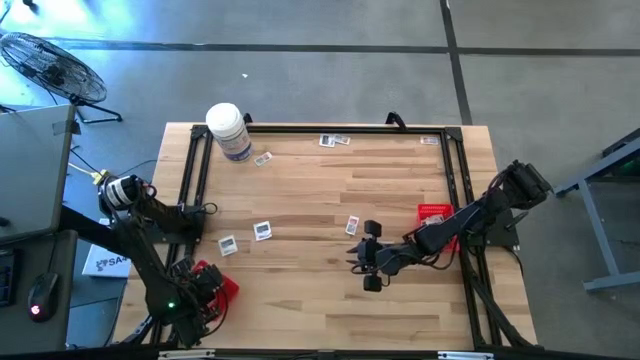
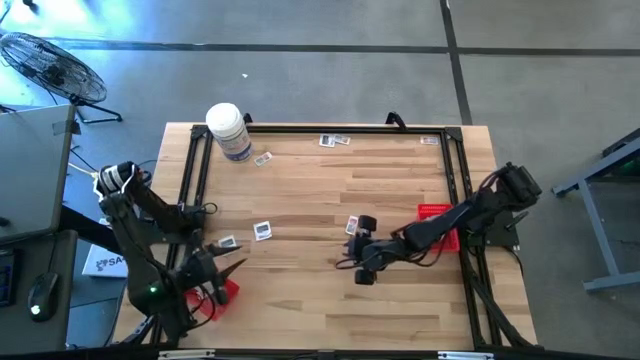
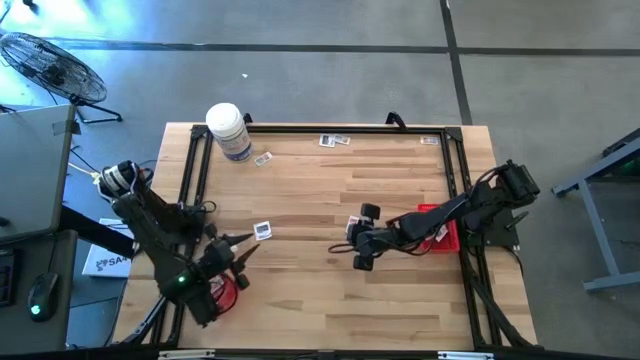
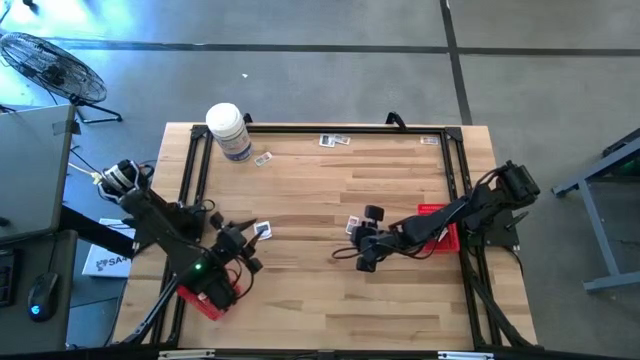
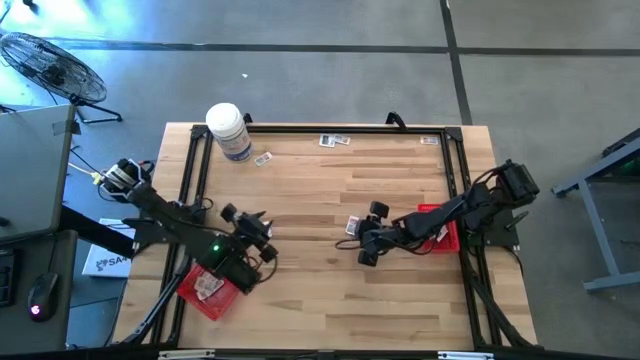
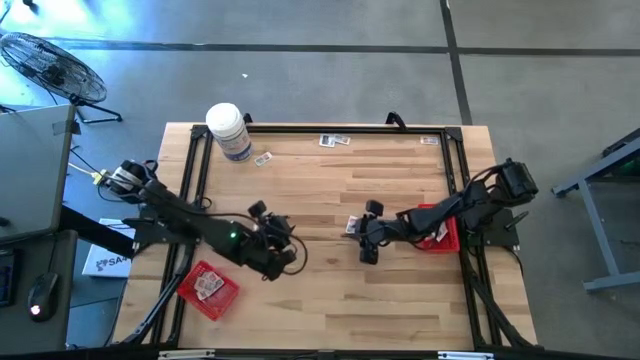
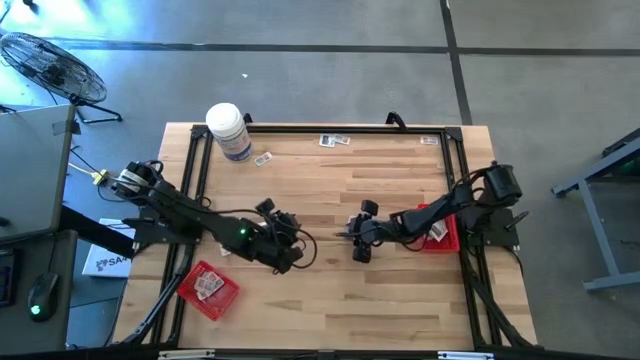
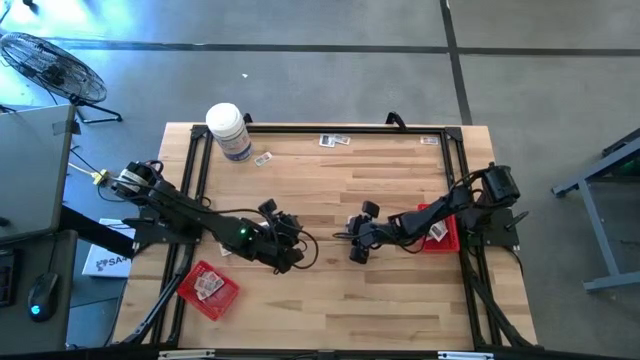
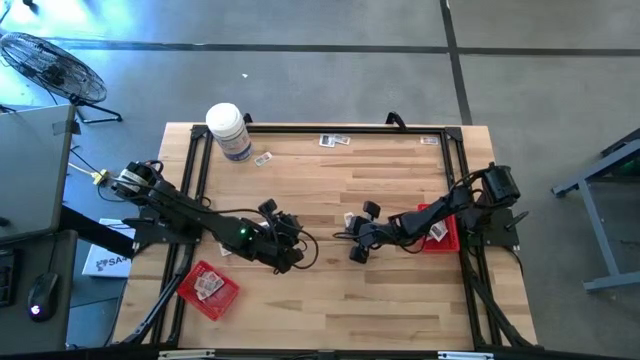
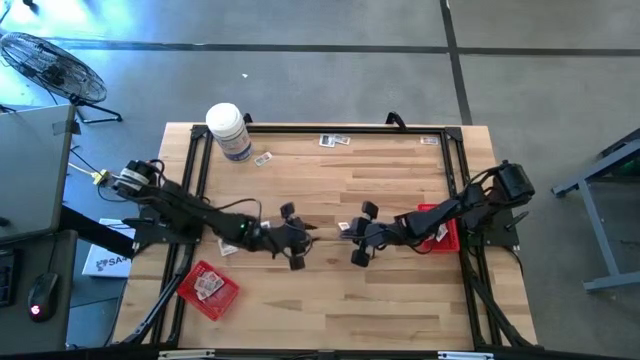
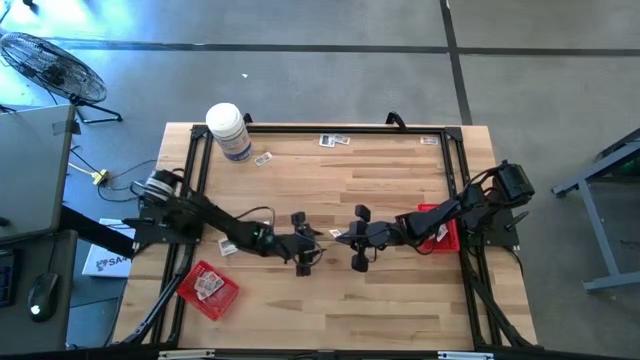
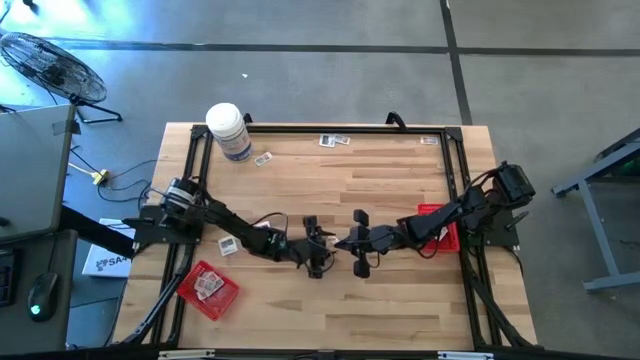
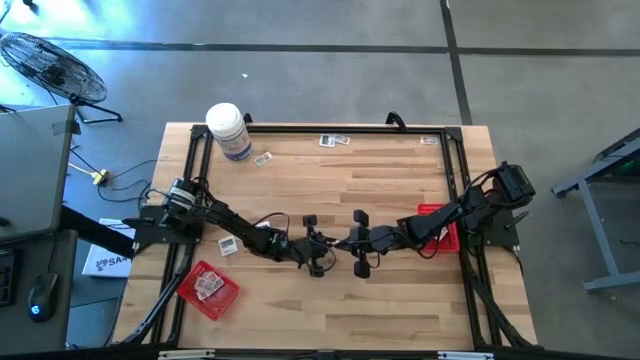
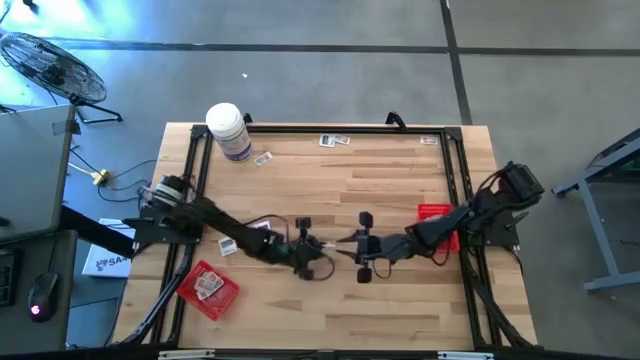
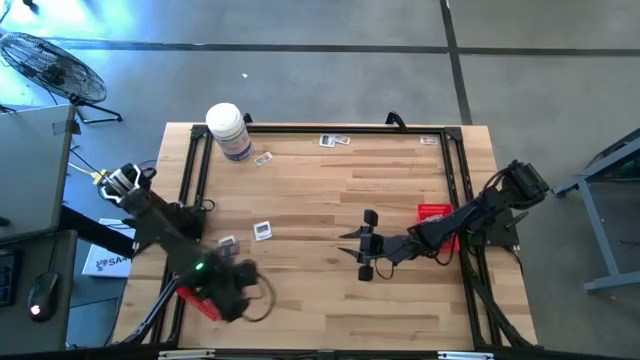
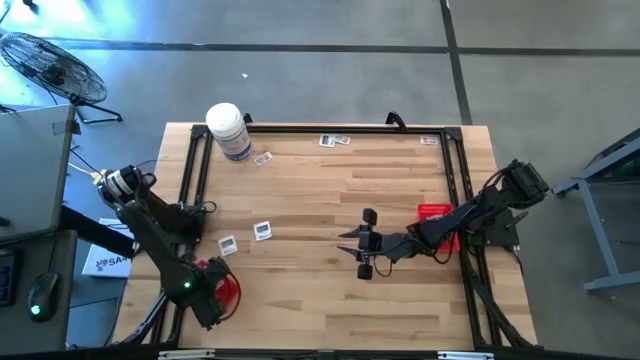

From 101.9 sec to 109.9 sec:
Task: Pick & Place First Aid Supplies
Put the ointment pack into the left red bin

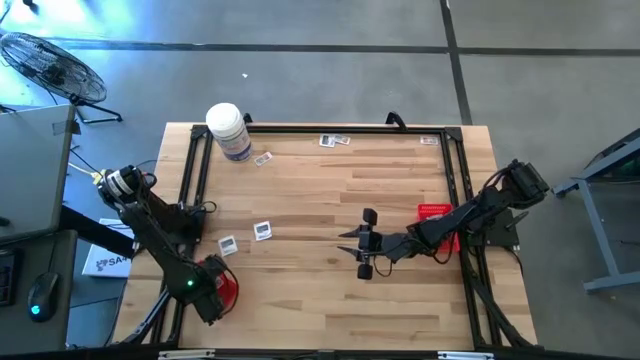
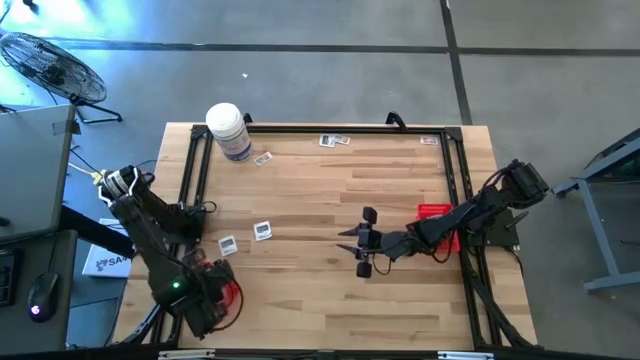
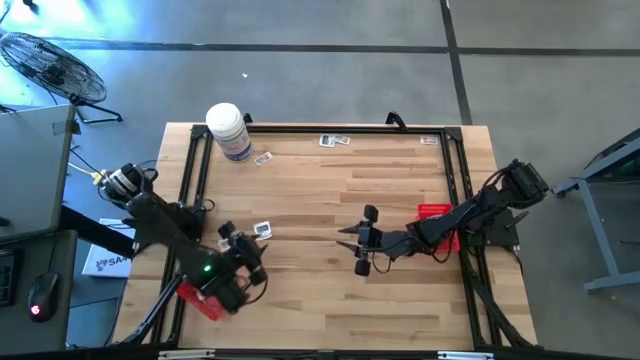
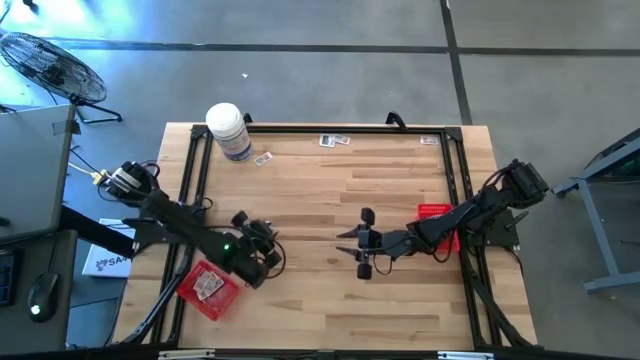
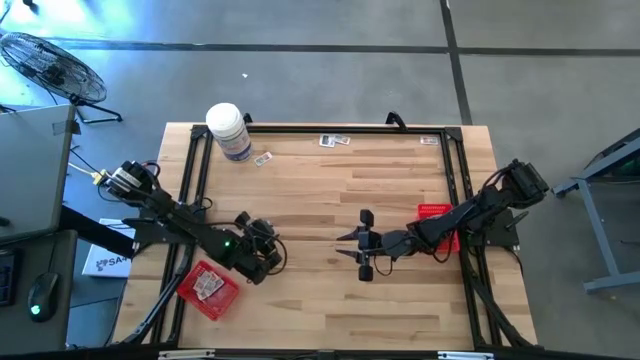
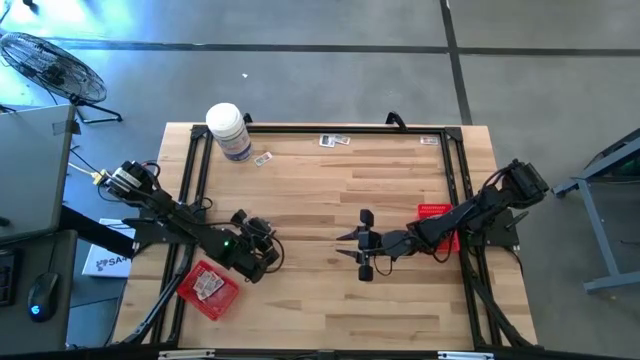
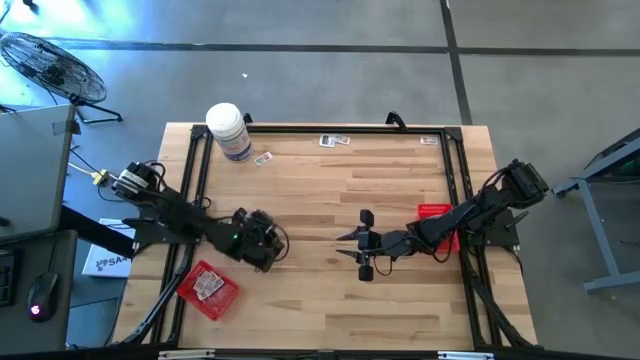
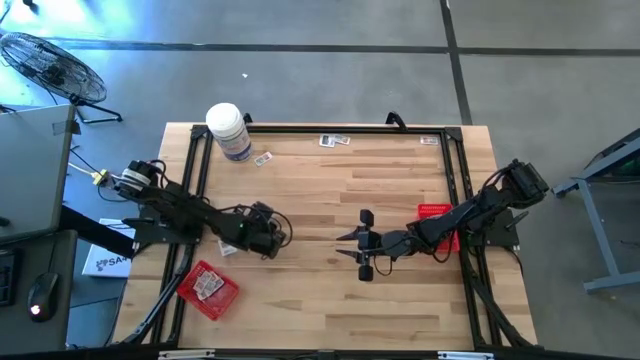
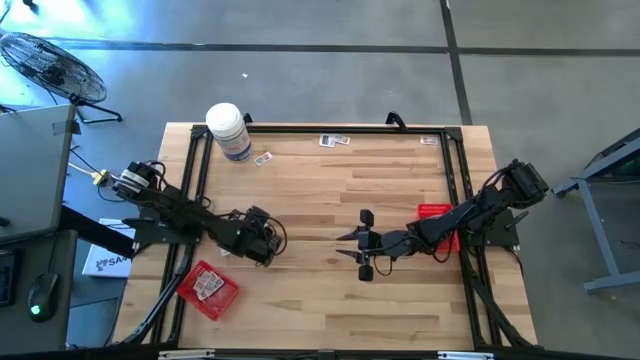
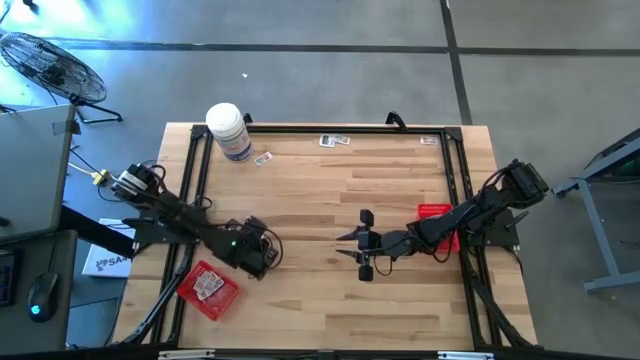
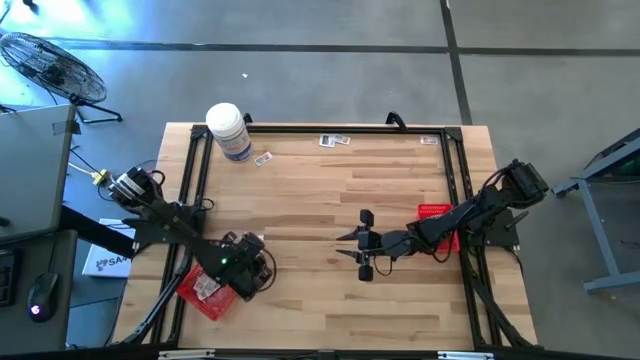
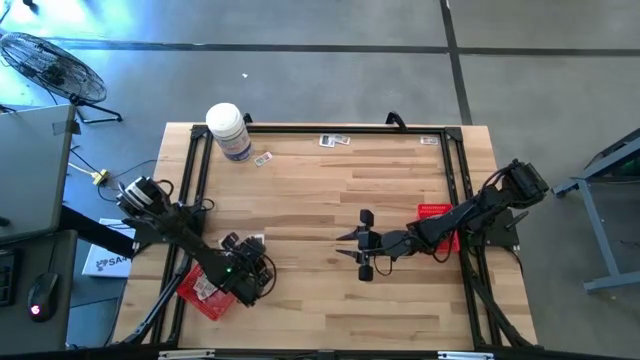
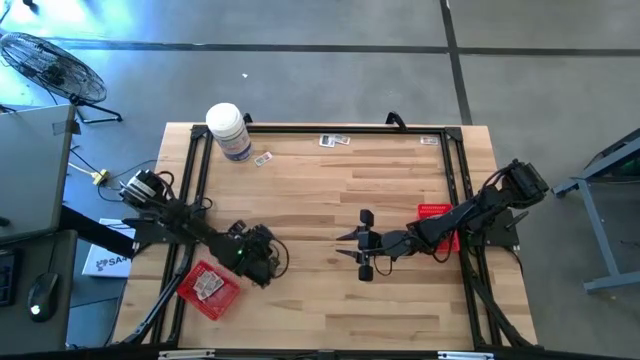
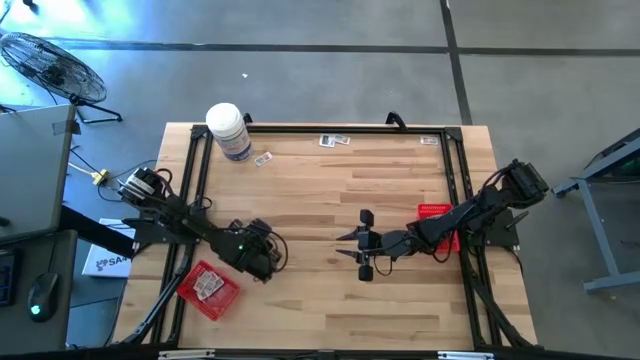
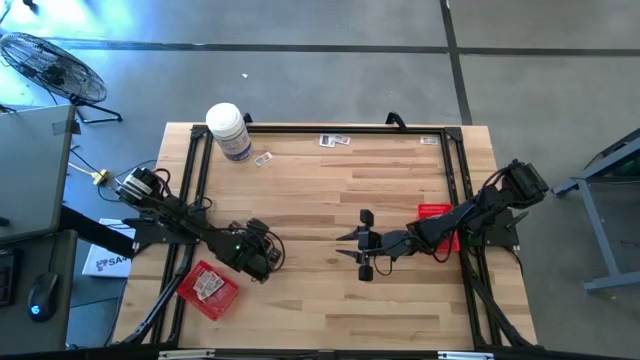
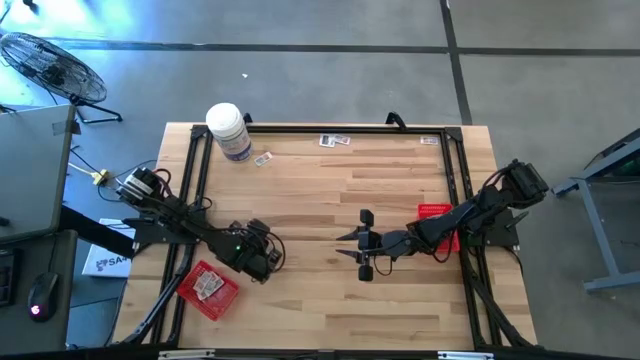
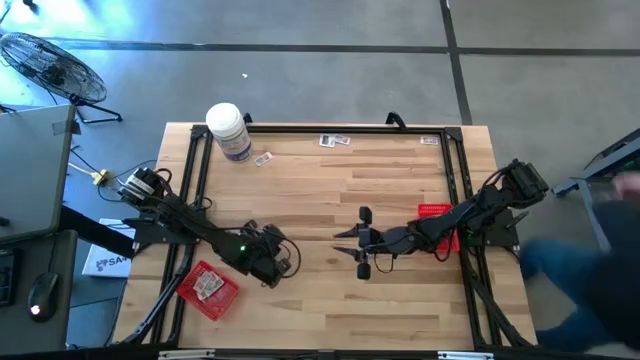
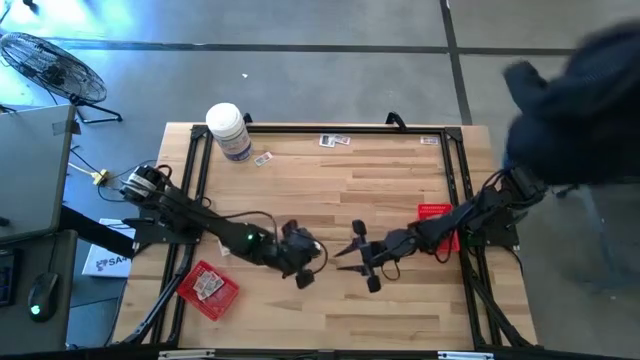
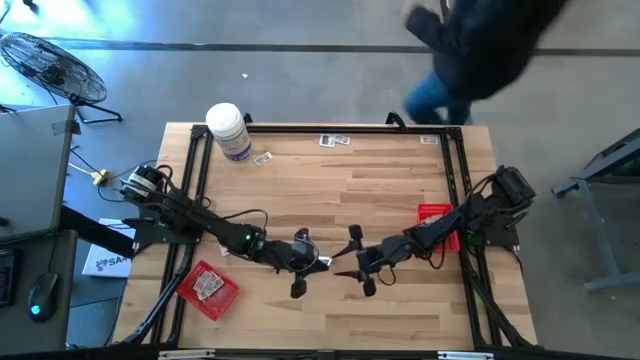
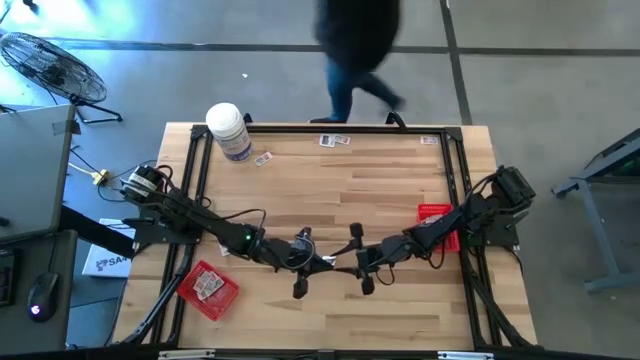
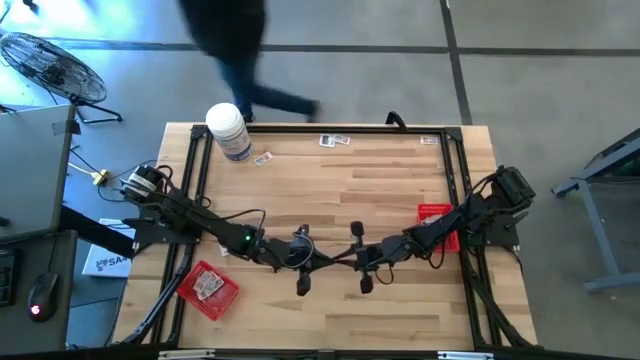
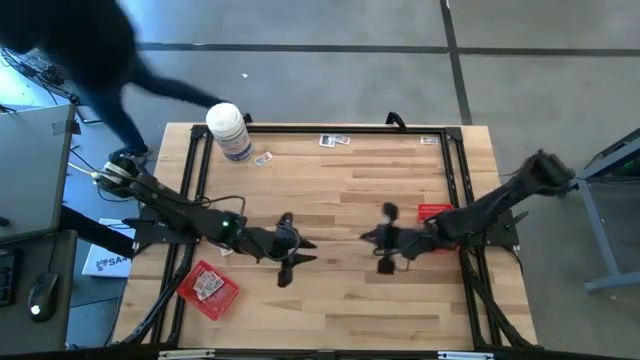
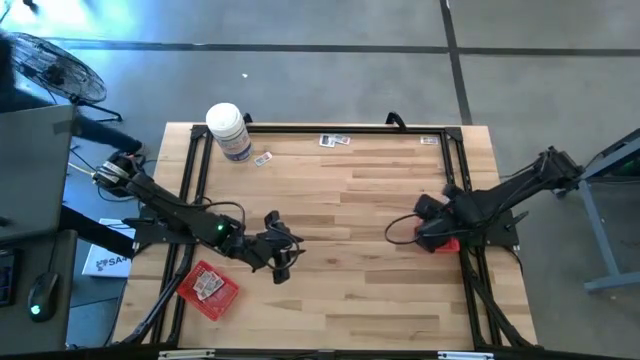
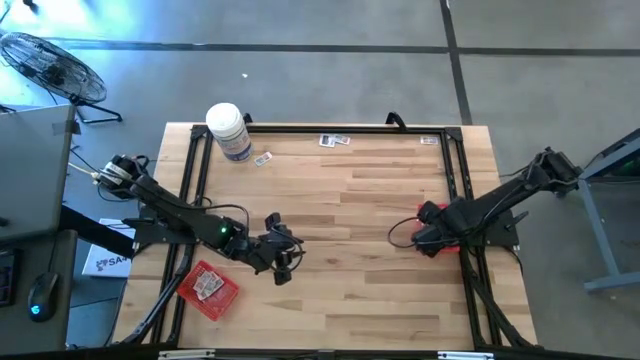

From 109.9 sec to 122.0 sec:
Put the towelette pack into the right red bin

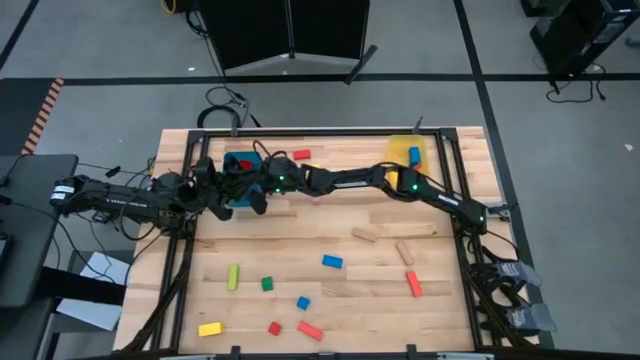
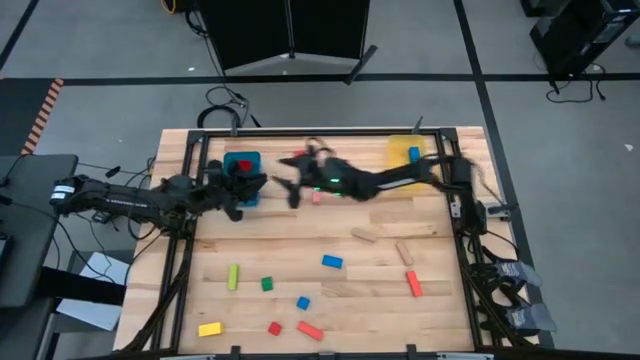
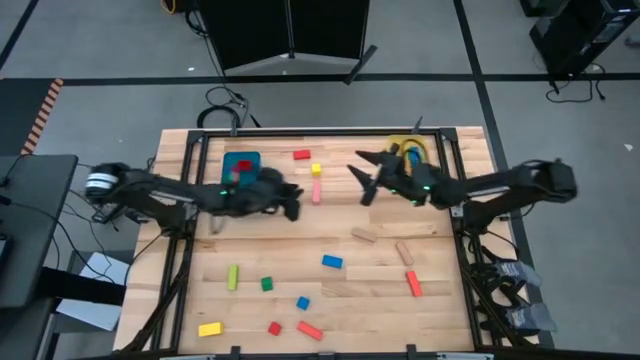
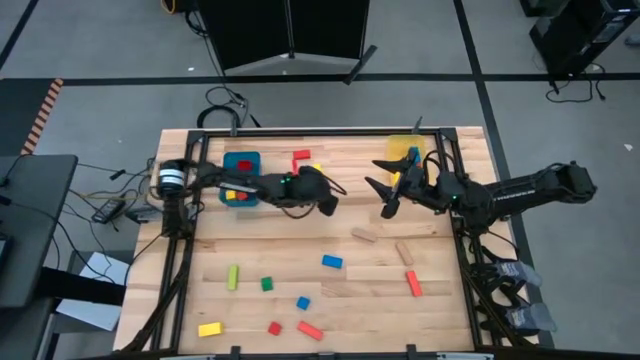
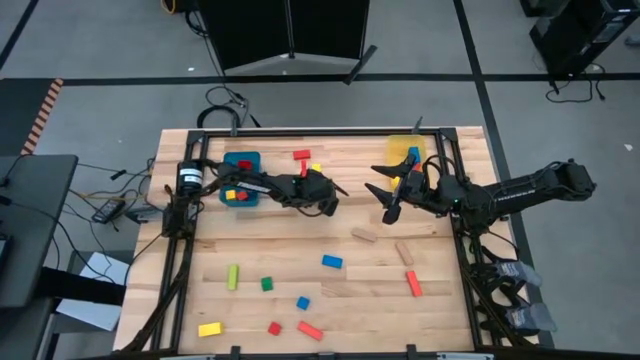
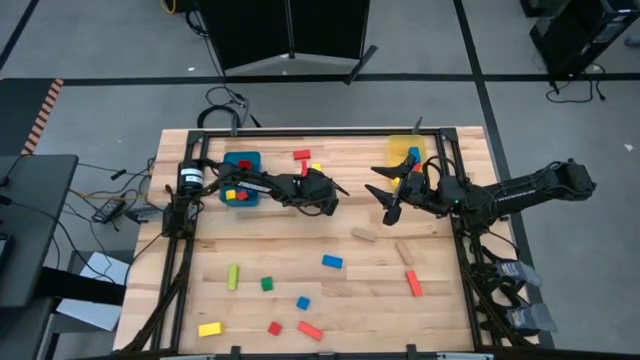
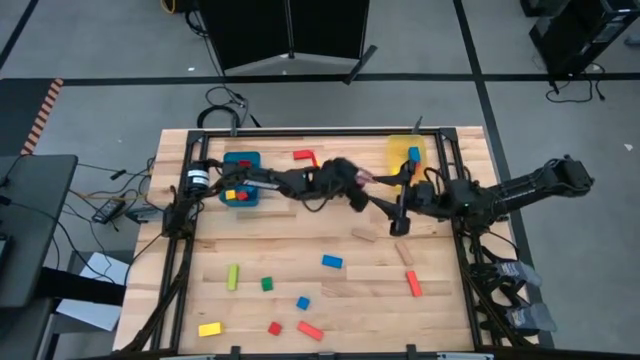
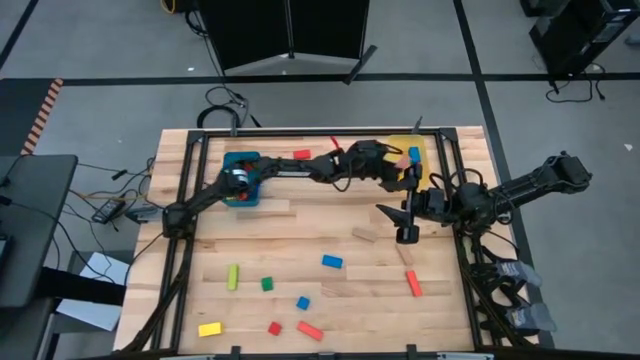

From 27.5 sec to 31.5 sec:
Task: Sort blocks by size
Put the large orange block into the yellow bin
